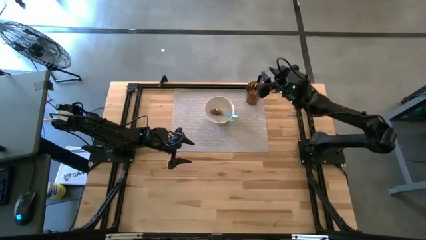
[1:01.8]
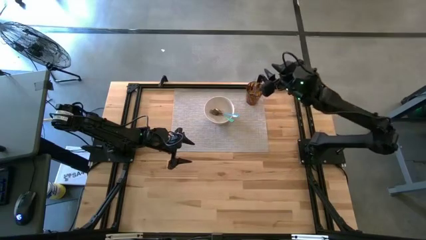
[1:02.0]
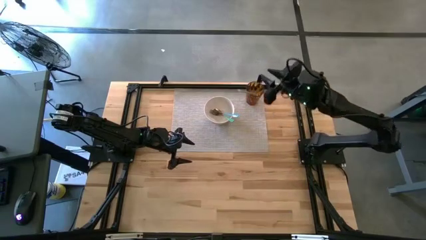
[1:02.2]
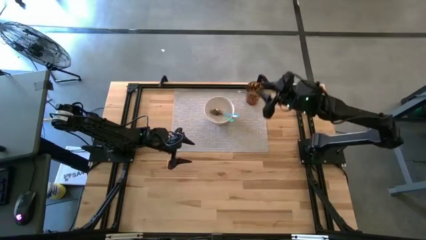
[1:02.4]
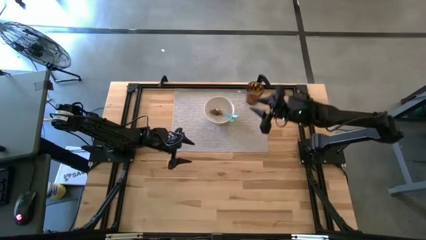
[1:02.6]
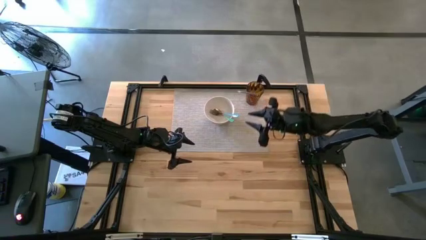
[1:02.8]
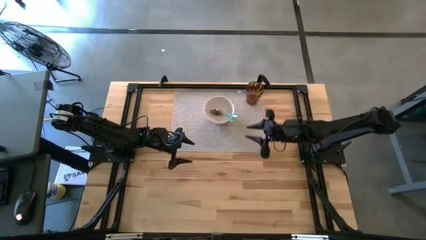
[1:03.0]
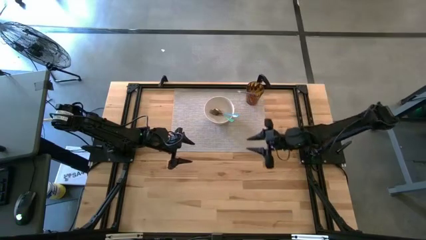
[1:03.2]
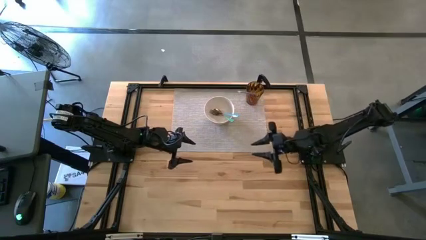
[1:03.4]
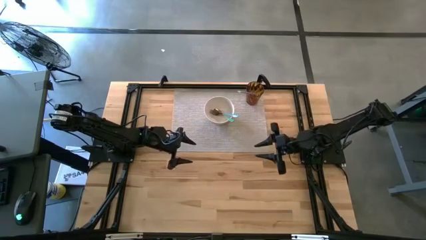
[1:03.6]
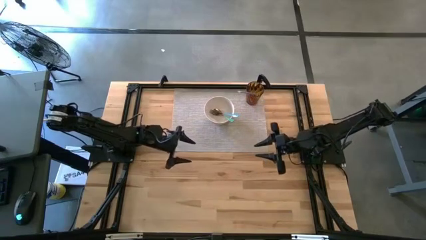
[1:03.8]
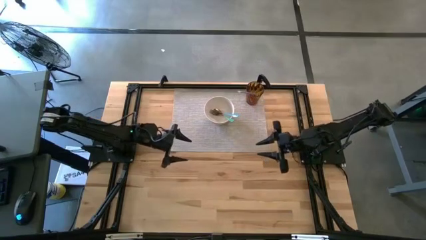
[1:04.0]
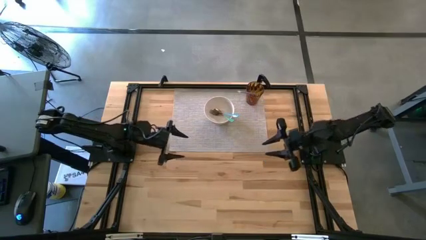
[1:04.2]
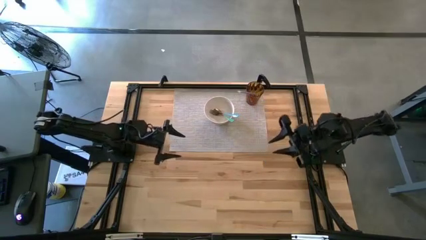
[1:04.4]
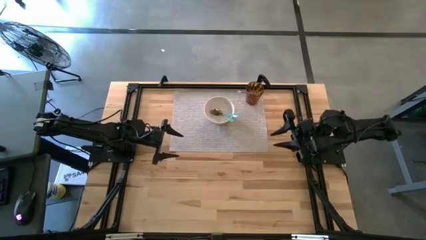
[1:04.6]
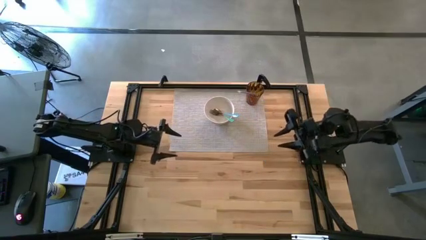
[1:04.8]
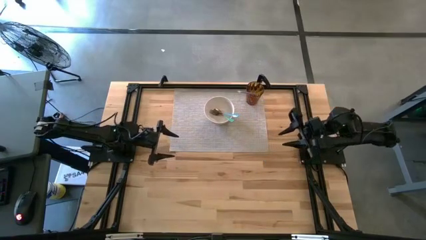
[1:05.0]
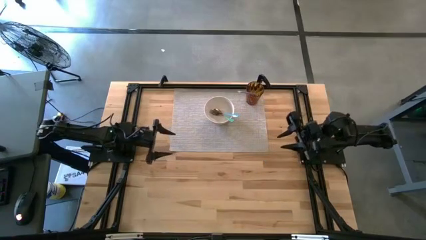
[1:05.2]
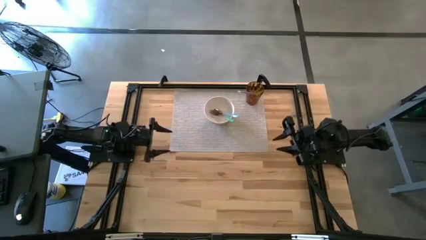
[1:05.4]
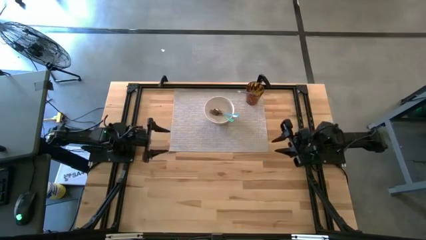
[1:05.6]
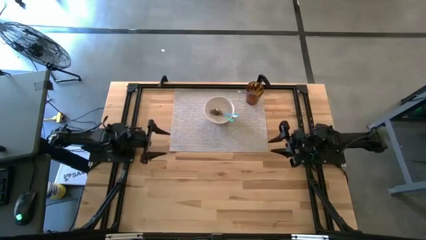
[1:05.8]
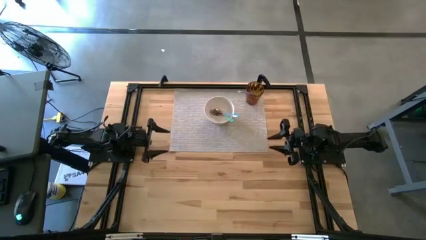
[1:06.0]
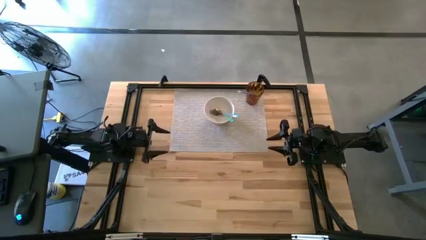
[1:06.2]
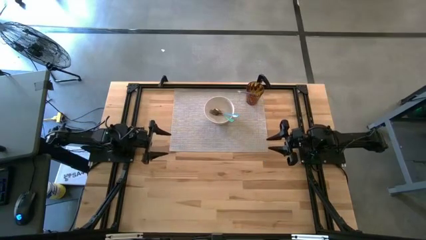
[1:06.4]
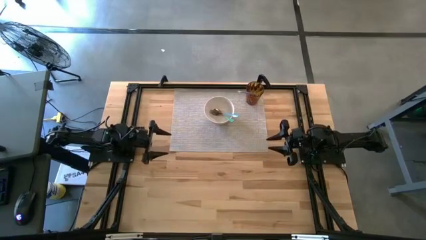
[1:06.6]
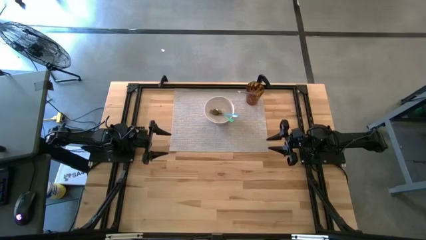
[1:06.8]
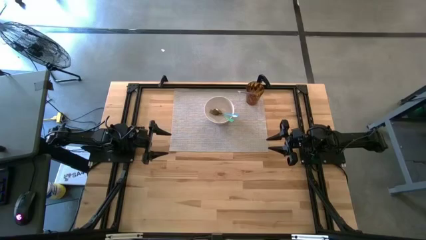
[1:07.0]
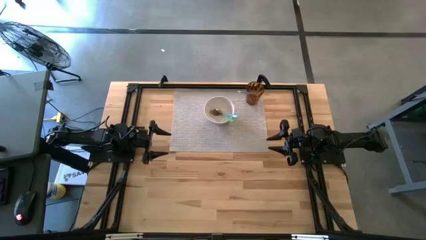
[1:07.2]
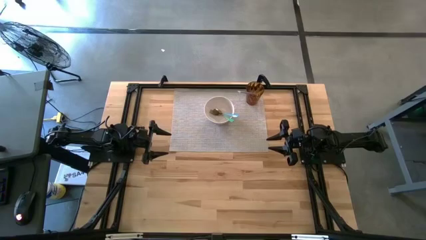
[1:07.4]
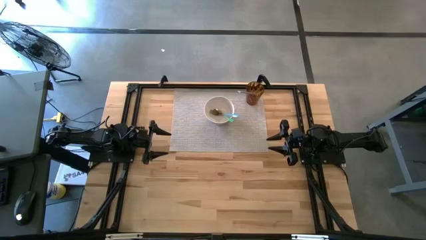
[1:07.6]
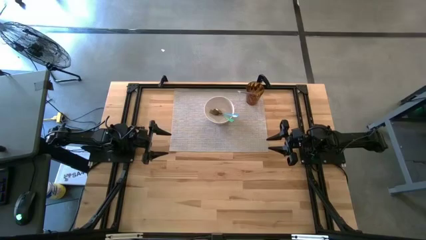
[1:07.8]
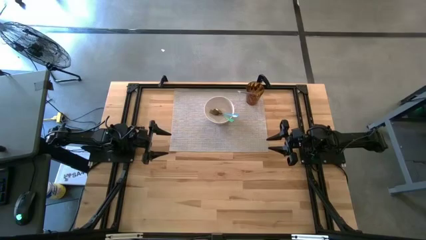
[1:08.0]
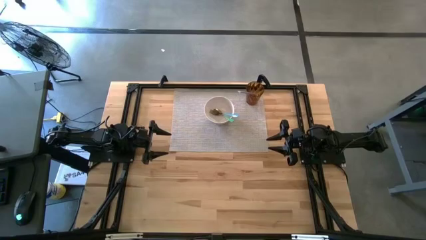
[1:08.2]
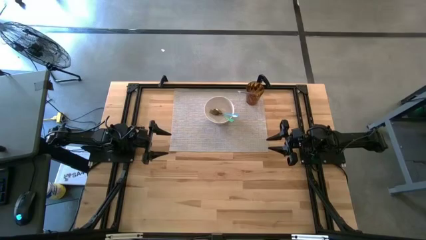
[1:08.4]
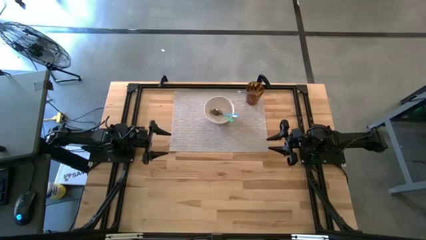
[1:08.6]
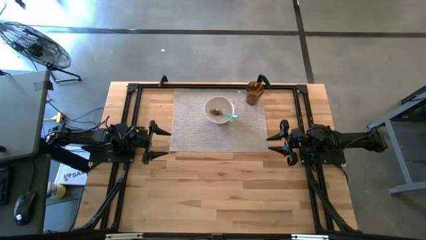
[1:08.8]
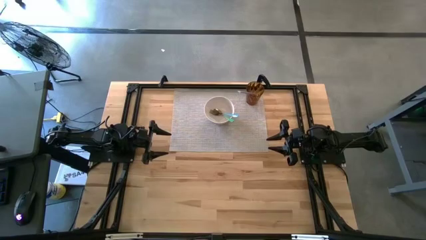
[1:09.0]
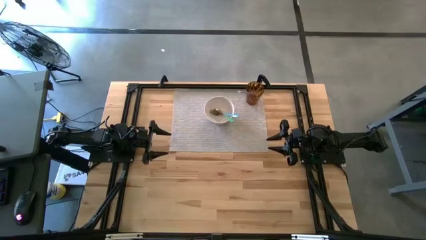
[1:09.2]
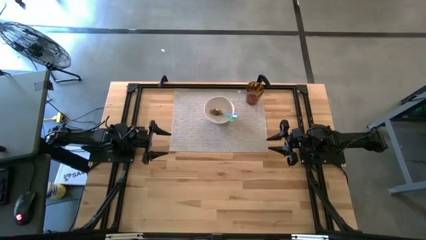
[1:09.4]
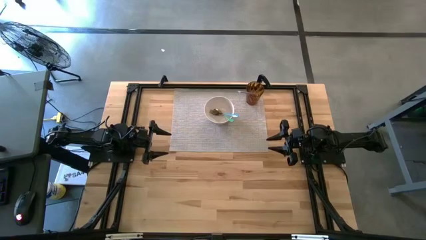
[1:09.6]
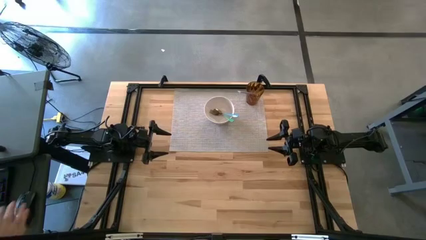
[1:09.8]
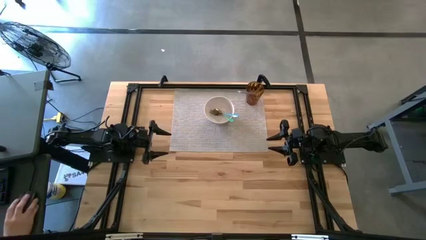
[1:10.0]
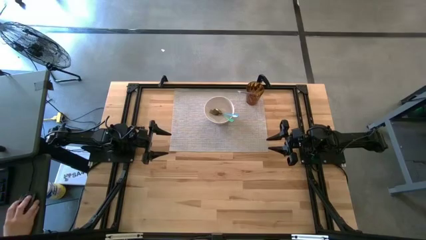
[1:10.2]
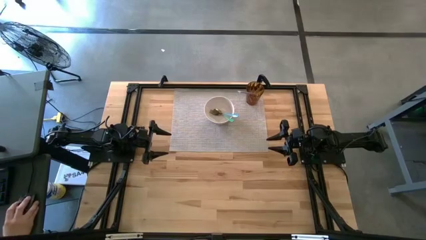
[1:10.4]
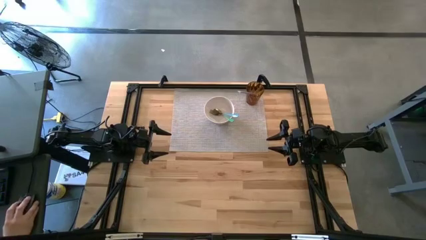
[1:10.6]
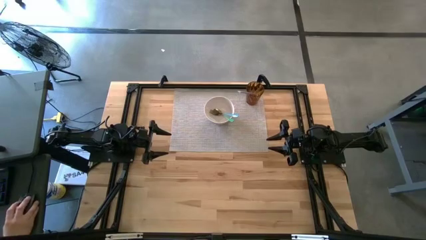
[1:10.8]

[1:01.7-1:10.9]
Task: Pick & Place Utensil
Return to Home Position

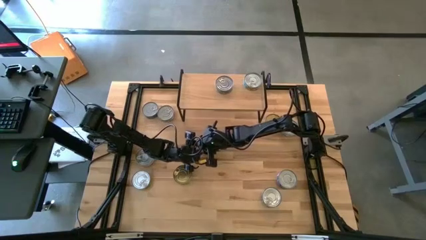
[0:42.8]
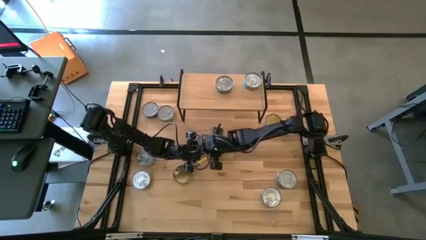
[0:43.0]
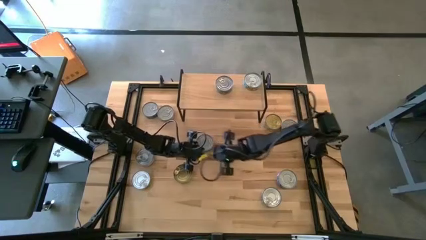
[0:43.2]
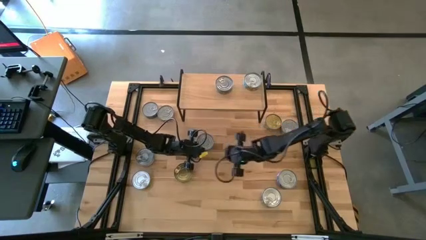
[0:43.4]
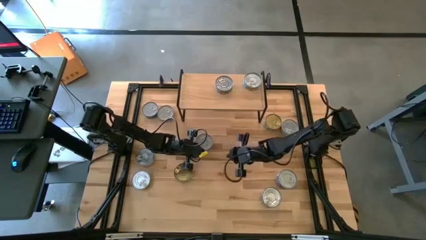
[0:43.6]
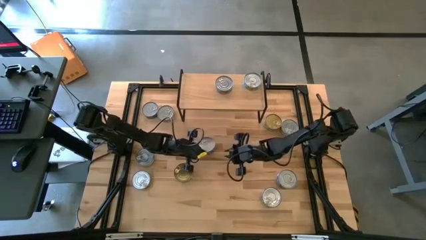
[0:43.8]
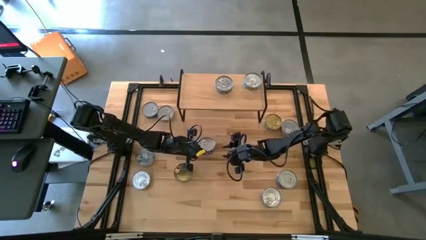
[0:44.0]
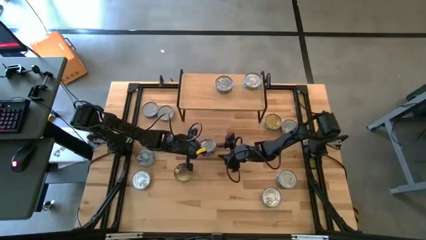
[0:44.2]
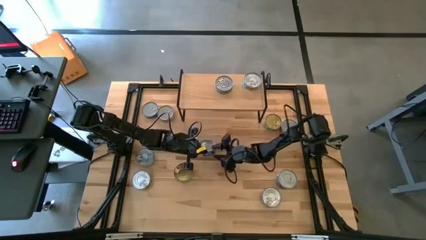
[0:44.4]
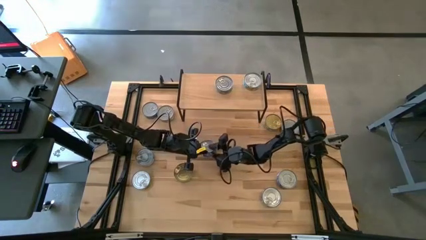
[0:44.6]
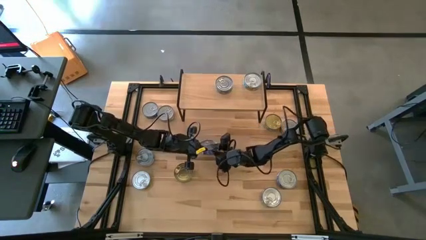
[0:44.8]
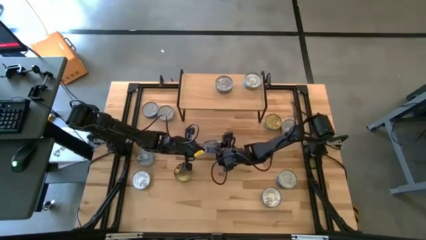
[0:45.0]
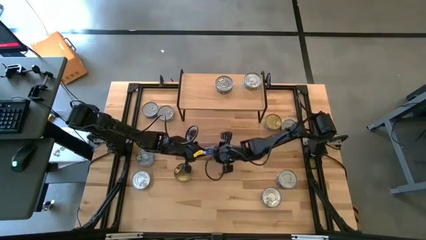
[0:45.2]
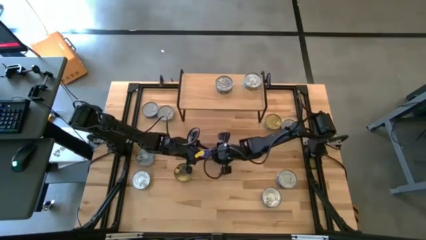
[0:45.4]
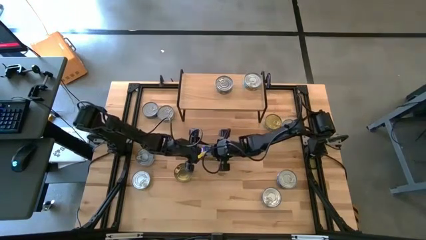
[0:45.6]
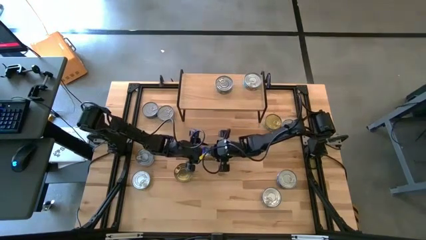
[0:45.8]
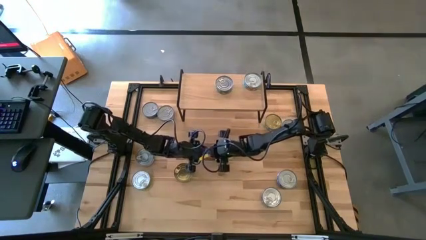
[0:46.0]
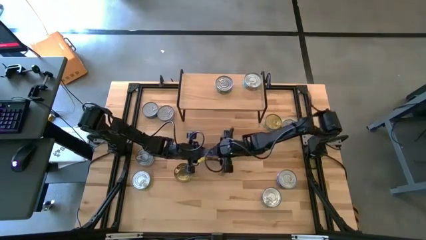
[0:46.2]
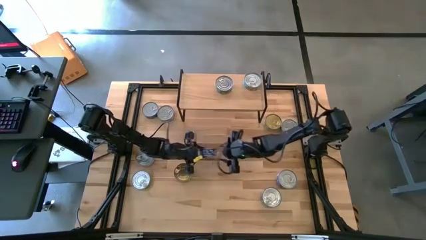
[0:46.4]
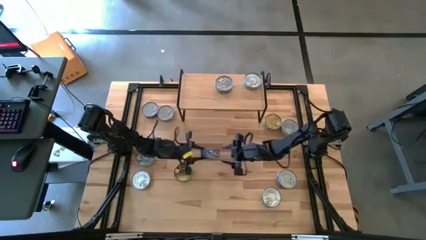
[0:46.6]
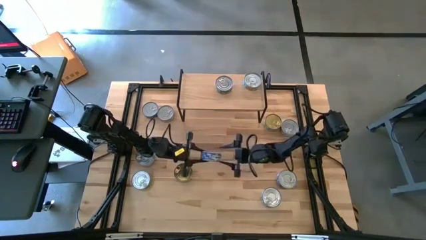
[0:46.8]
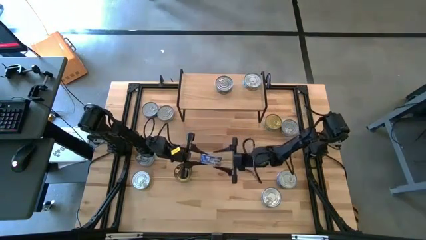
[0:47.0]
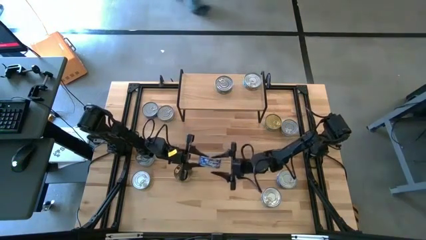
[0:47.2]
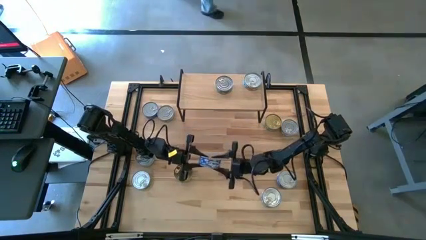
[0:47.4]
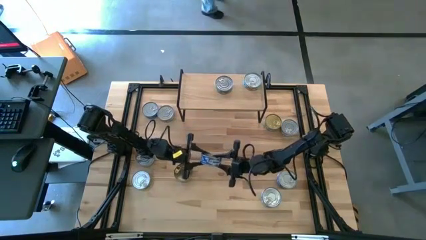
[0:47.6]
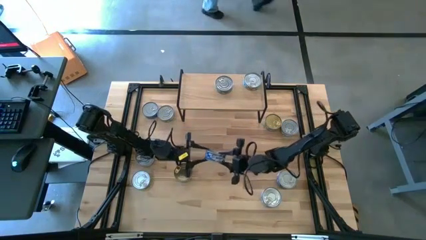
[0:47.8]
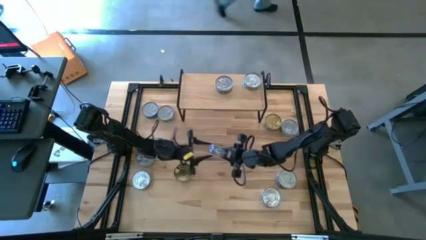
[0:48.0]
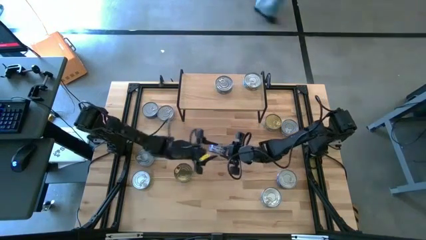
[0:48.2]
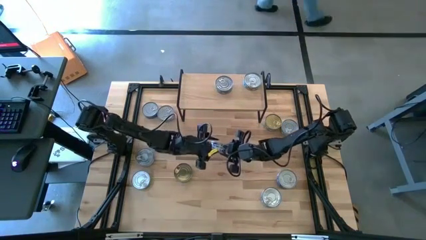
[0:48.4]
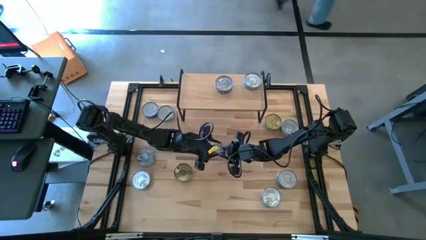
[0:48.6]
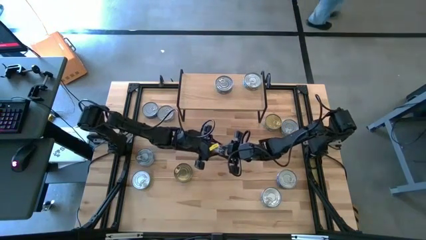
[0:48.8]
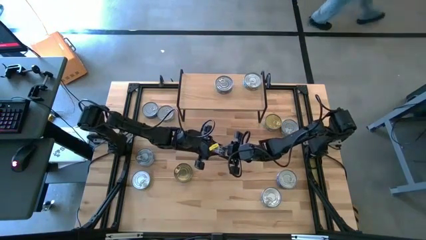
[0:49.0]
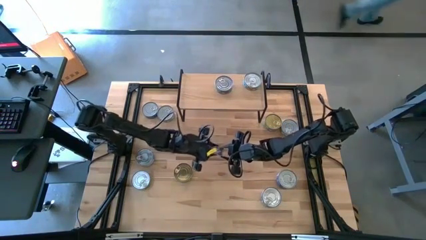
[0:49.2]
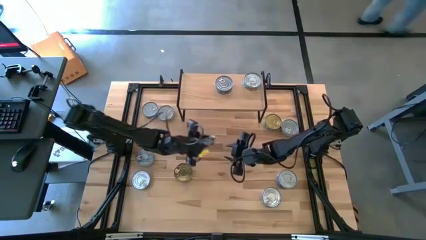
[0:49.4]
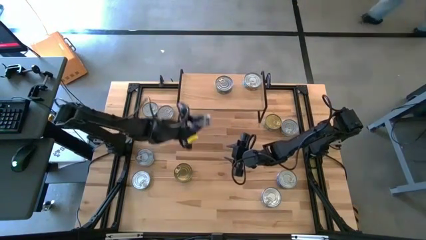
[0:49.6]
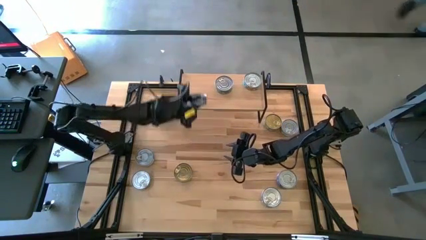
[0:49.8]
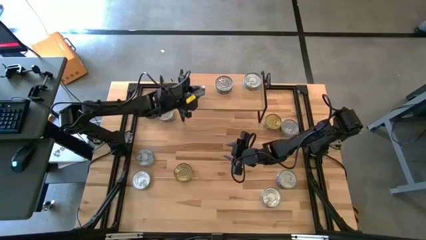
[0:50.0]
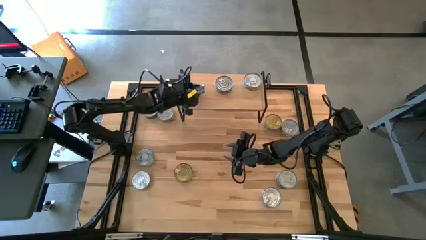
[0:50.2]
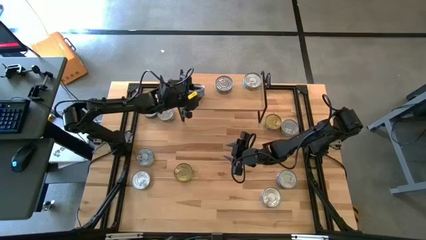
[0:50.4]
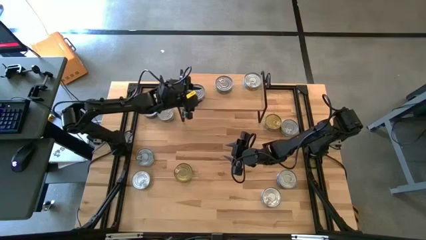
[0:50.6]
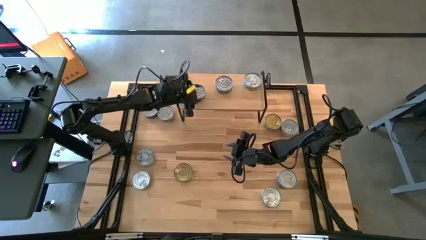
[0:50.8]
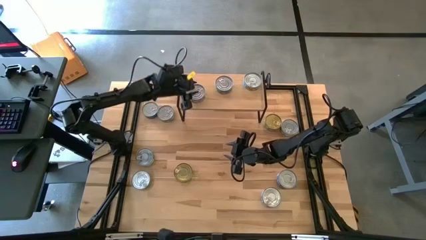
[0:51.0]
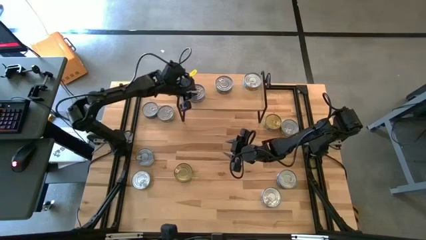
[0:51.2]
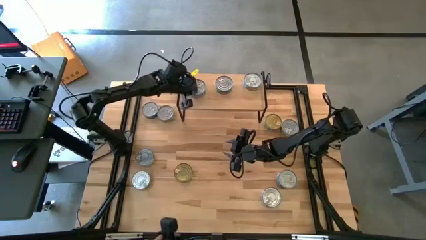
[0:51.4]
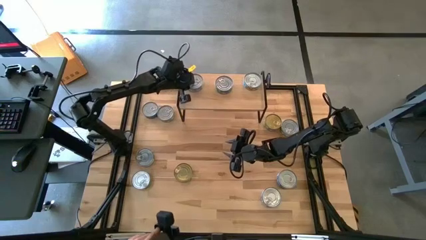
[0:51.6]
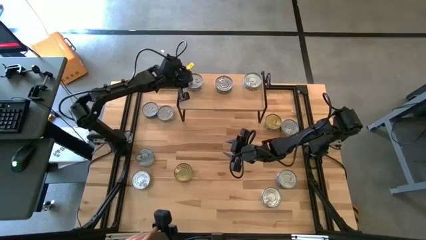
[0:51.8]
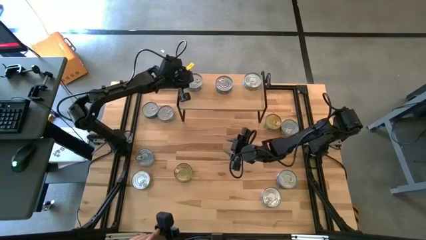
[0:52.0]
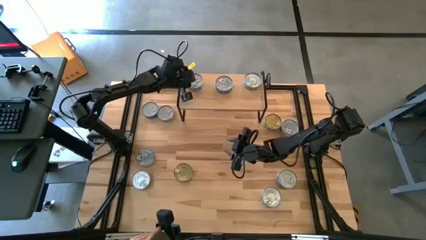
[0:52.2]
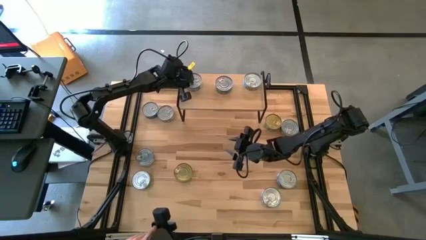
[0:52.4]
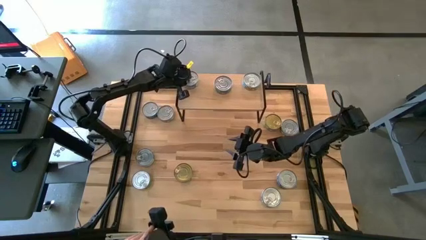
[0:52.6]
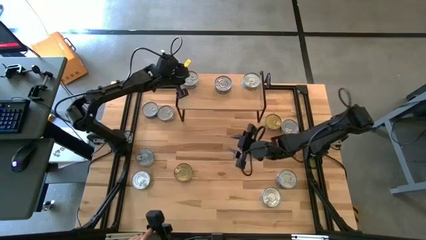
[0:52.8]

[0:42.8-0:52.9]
Task: Stack canned seafood by type on shelf
Put the blue tuna can on the shelf
